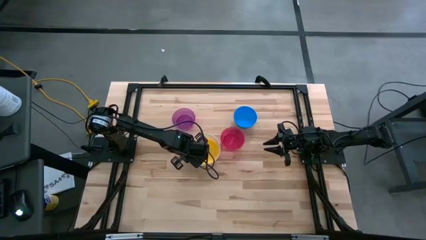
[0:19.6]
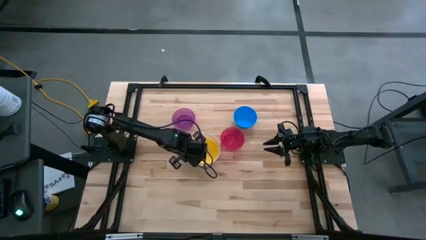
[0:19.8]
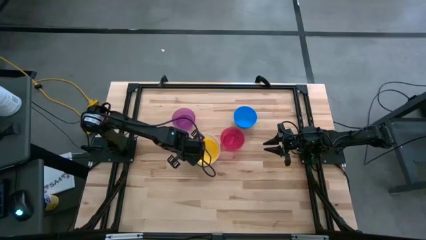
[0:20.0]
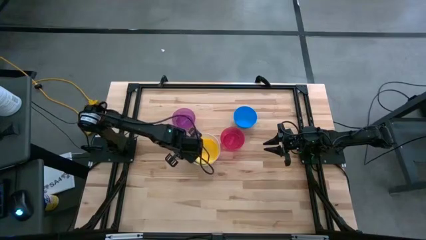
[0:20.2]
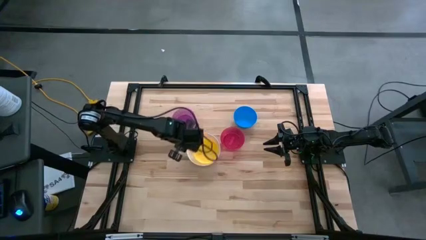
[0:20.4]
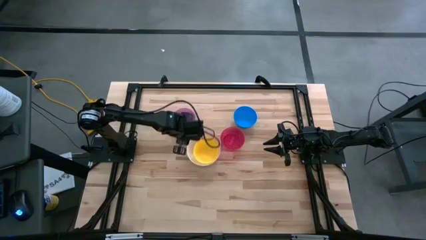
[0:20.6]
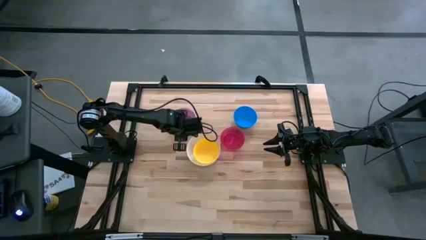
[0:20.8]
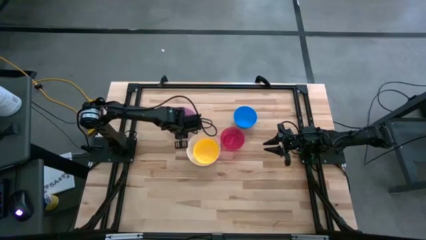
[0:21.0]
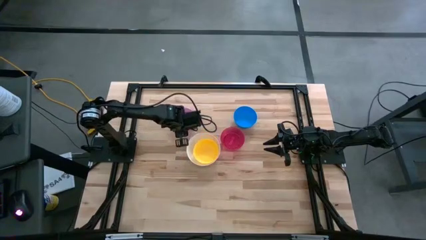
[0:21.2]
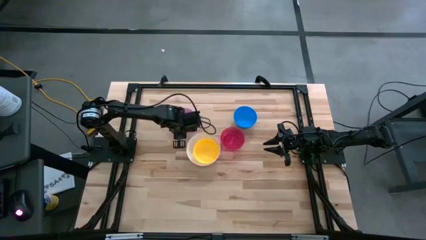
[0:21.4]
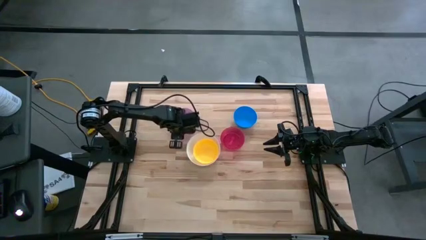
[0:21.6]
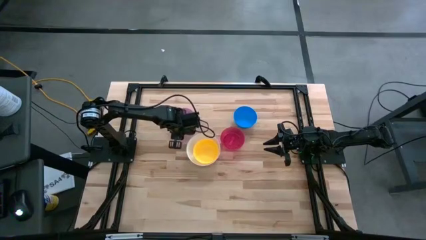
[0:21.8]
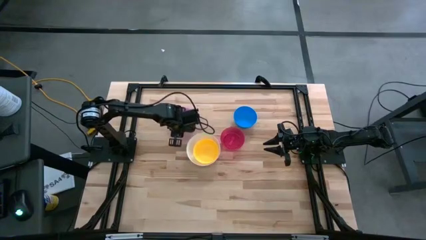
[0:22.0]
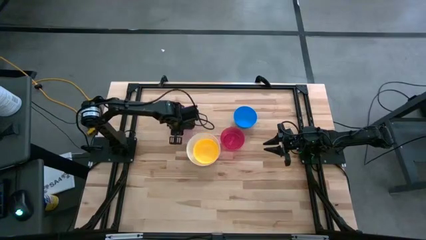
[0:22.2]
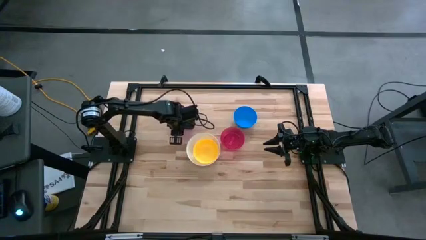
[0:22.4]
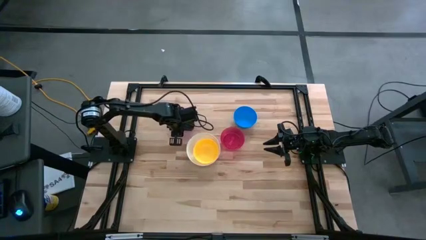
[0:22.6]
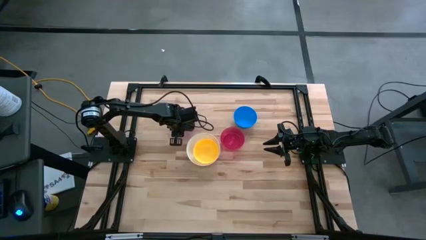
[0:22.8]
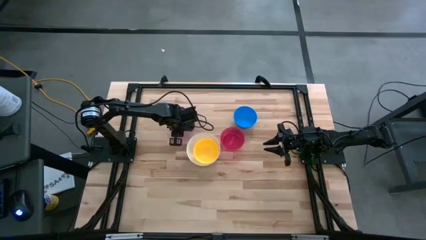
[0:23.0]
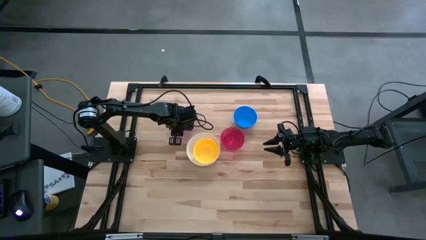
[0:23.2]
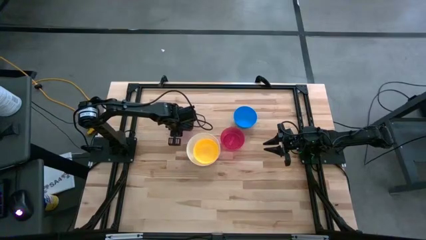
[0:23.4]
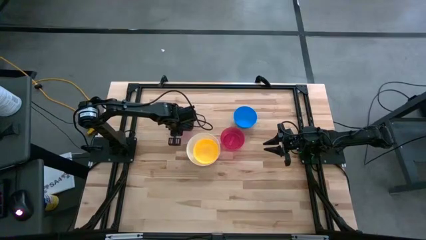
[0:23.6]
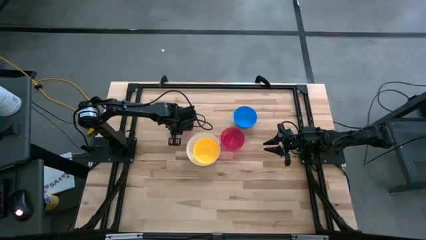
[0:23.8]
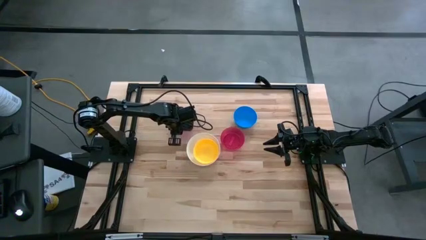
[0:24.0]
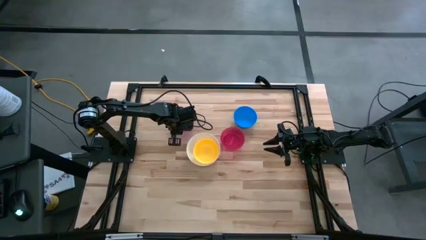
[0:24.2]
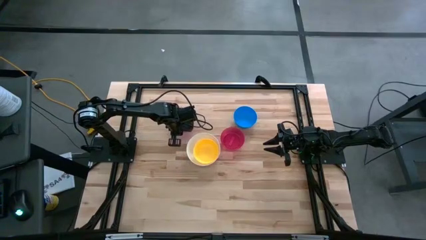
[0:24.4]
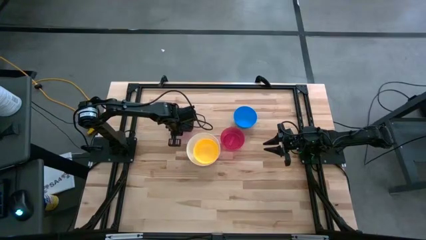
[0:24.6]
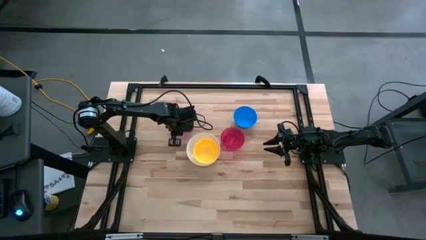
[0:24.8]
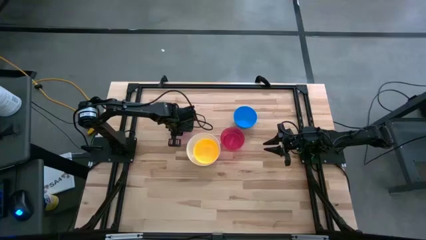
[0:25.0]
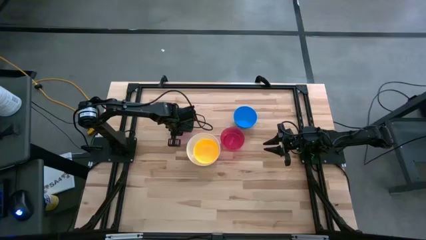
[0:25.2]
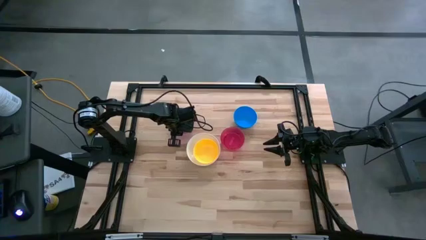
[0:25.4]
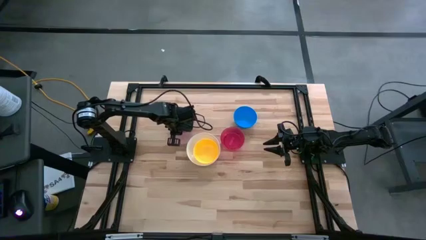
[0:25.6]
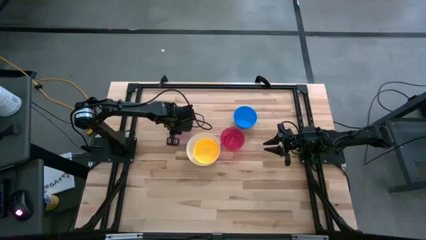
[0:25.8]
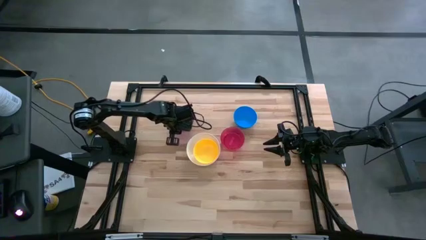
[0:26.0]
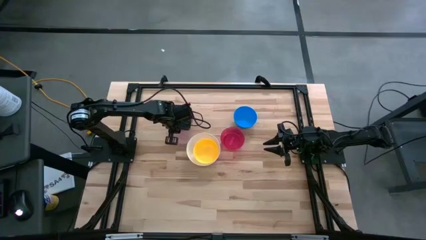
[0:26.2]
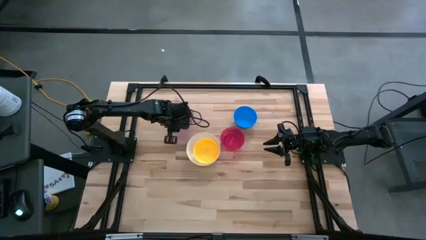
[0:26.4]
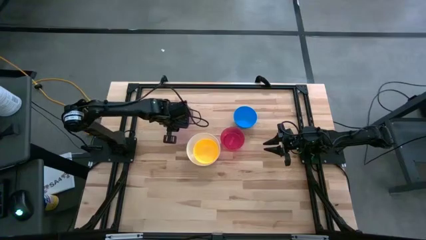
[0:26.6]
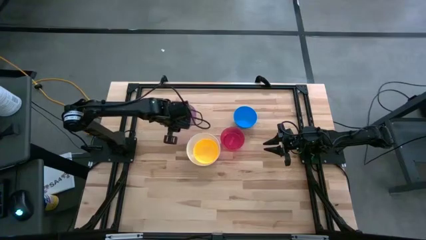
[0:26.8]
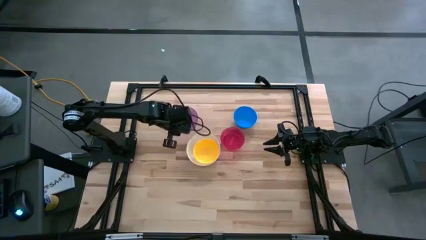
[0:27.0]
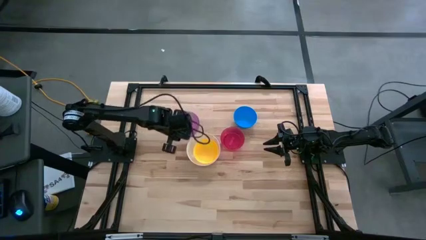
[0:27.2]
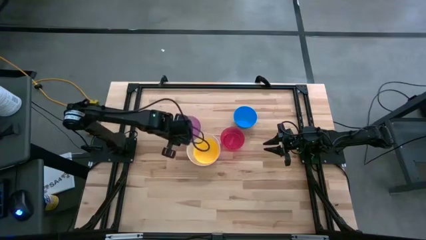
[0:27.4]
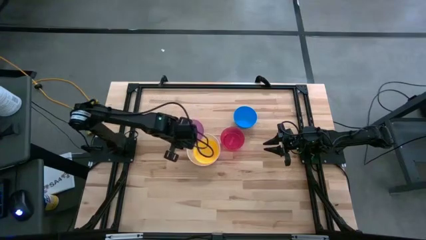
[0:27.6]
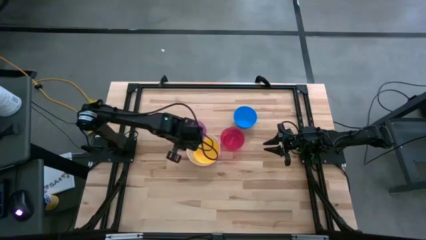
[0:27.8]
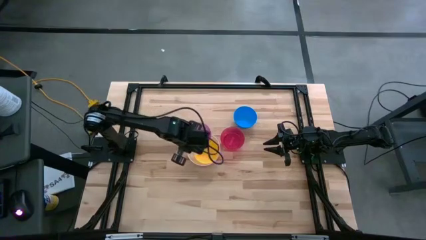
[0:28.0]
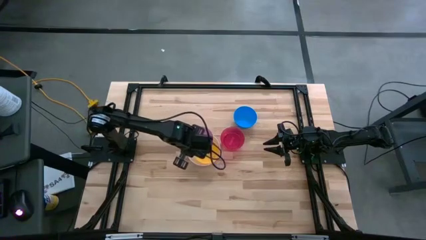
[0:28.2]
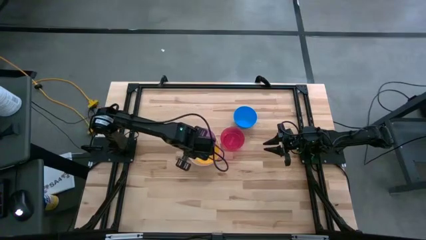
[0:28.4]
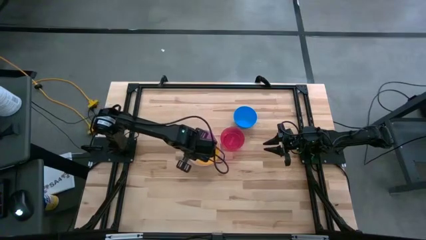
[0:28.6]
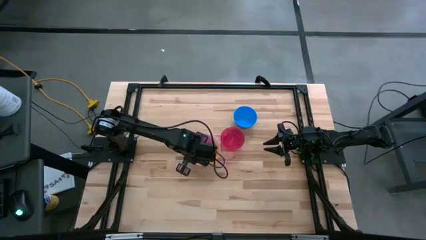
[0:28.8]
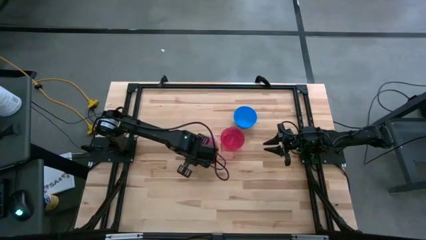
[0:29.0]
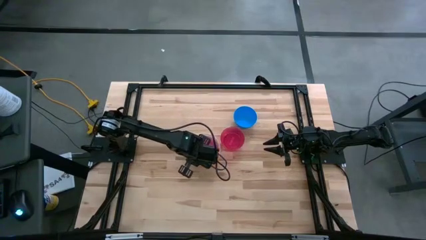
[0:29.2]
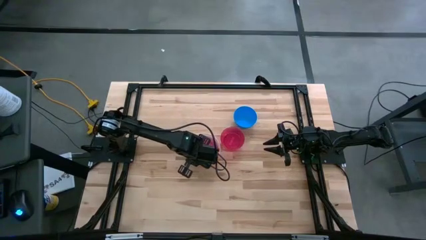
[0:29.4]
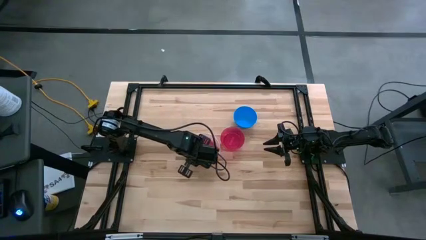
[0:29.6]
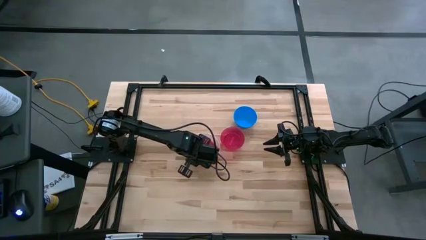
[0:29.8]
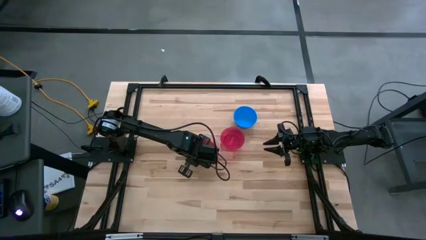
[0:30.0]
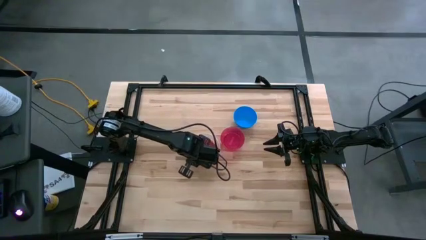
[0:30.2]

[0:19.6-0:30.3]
Stack the purple bowl on top of the yellow bowl
